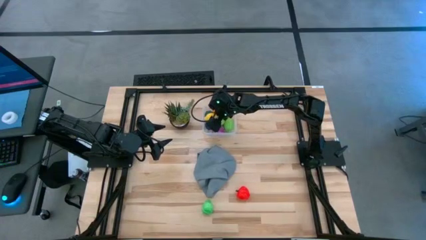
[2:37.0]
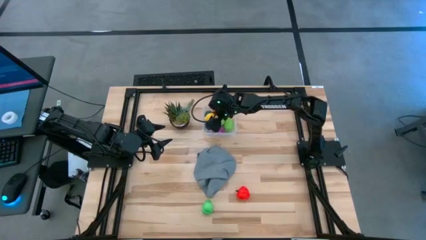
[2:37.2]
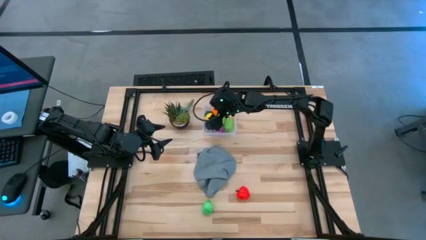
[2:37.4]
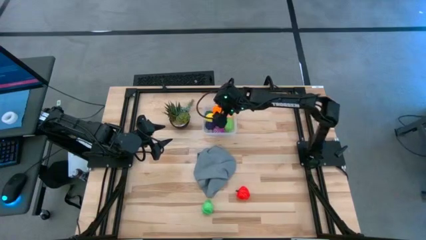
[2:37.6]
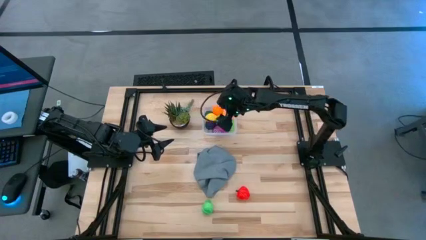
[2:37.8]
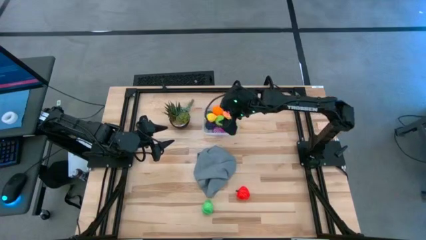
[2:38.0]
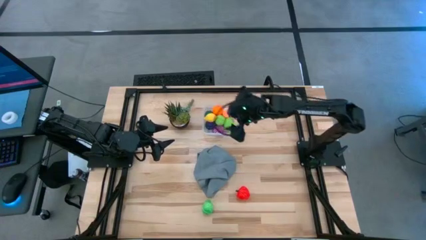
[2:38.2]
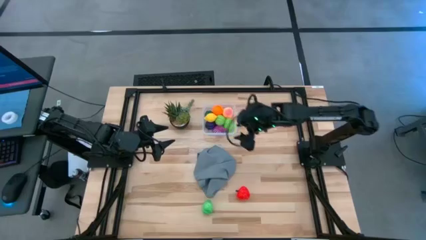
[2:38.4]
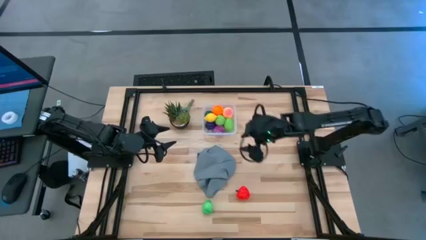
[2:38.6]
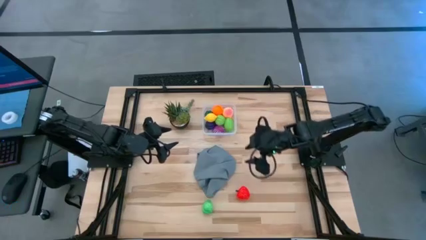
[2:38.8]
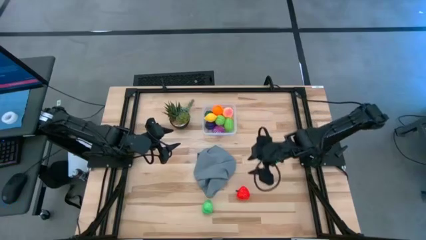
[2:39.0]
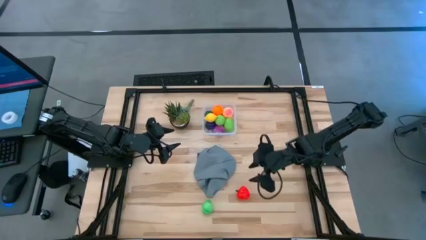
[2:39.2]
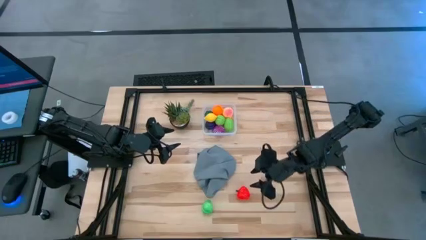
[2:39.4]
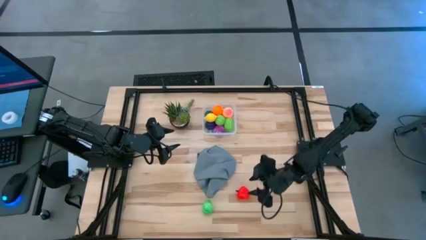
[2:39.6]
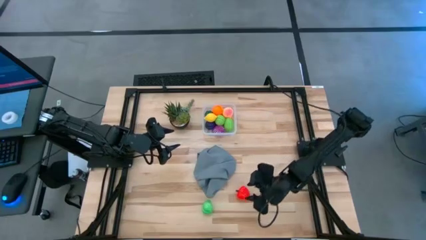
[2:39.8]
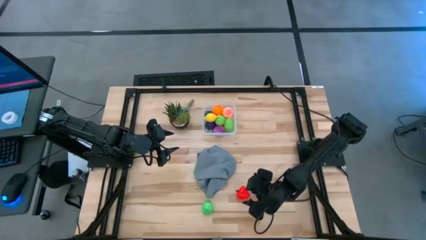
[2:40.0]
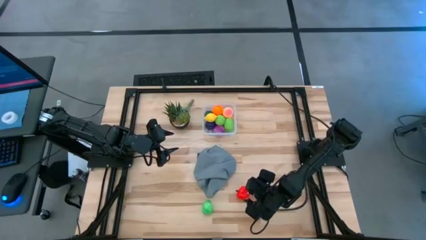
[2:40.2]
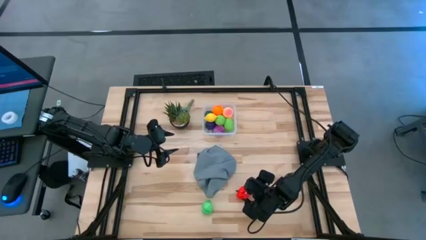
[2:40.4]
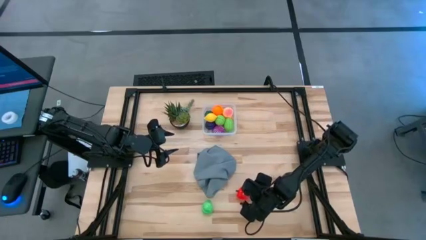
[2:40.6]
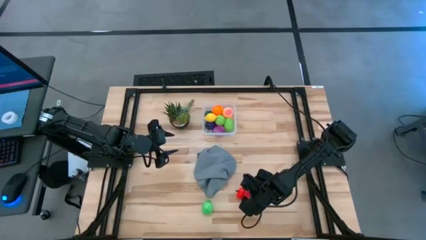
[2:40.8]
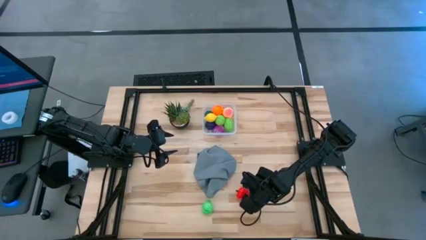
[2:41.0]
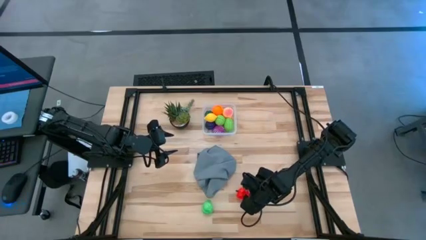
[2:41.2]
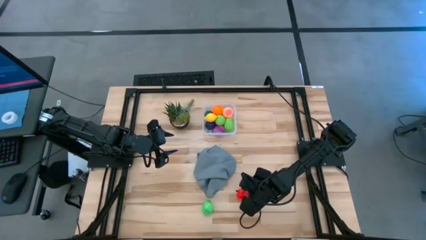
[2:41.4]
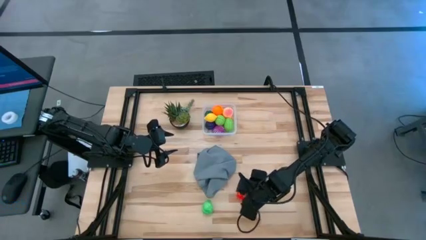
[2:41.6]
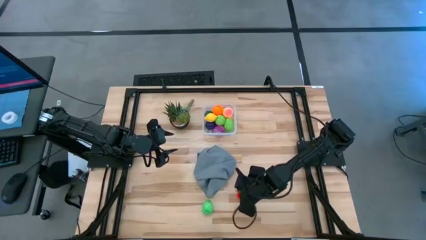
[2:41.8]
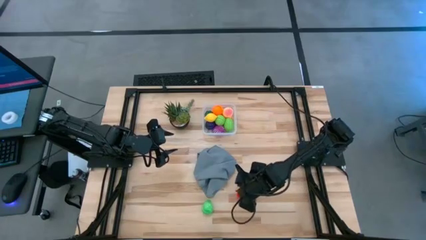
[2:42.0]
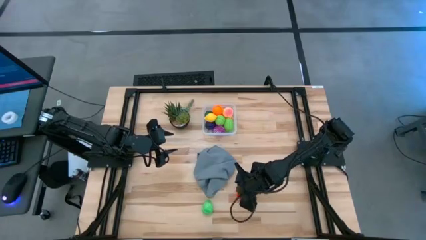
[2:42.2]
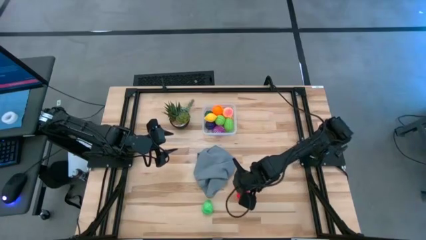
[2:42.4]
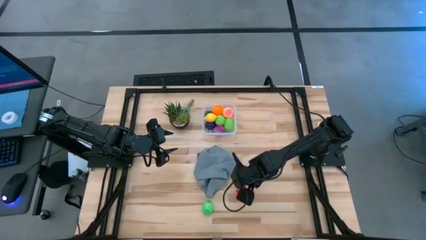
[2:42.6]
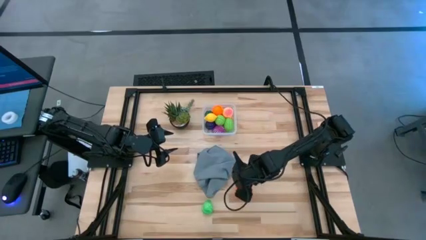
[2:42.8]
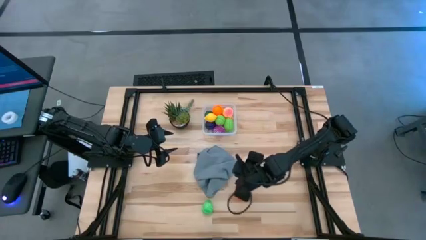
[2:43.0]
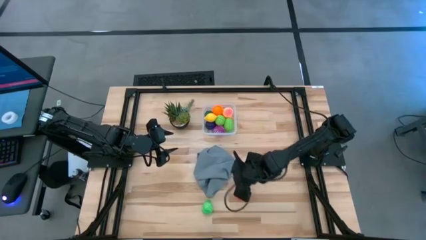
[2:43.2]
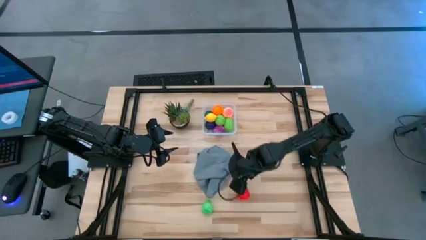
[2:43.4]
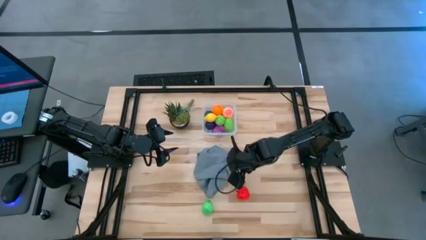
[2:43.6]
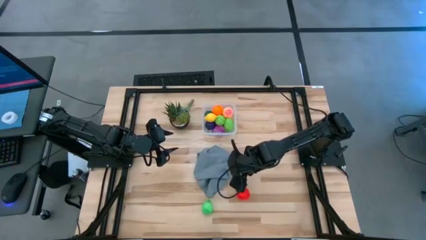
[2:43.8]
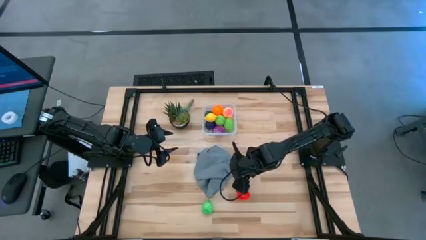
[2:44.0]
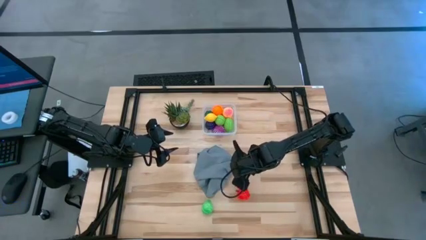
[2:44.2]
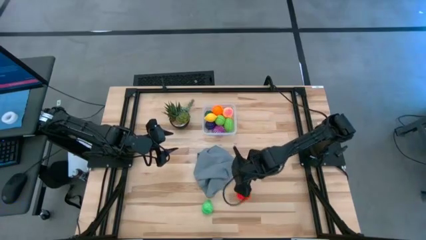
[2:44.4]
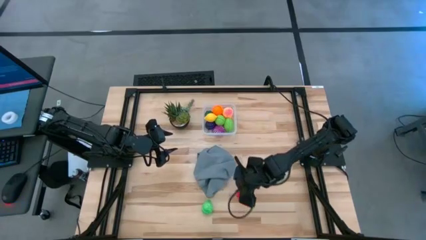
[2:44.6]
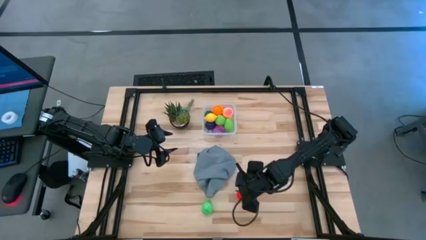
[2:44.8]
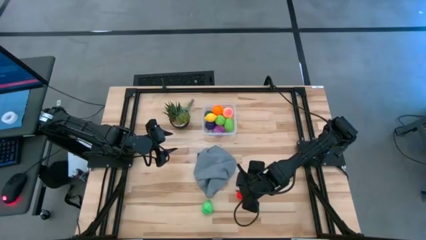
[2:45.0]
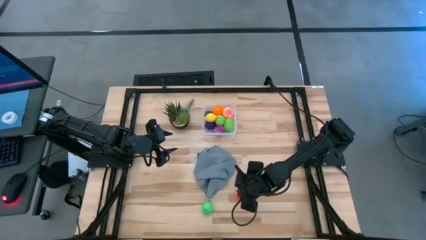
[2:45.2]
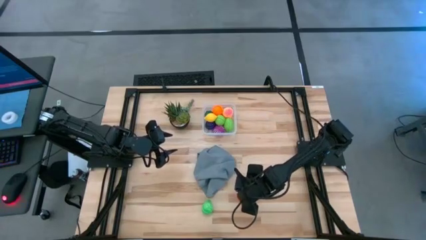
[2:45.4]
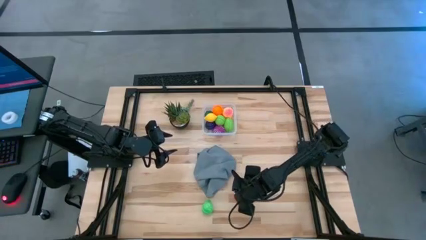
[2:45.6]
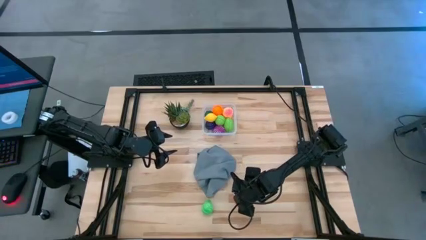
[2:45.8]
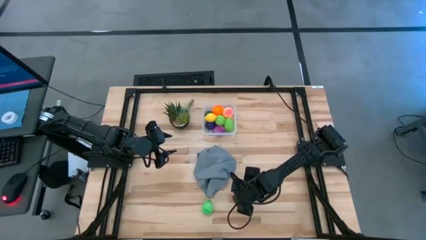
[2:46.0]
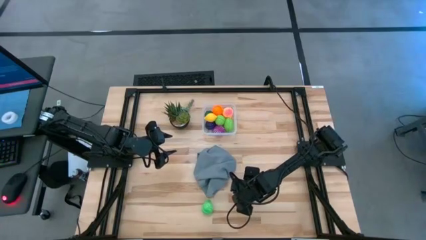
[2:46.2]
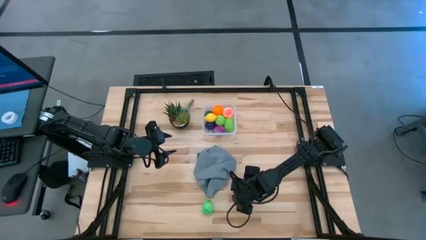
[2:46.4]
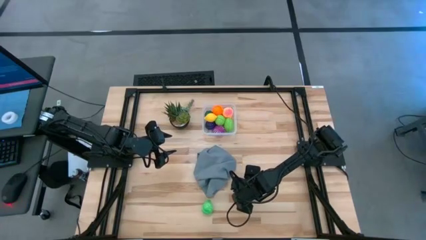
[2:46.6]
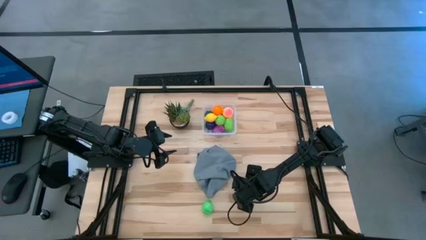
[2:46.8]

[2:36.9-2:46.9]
Task: Pick and placing Produce into tupperware
Put the red apple into the transparent container

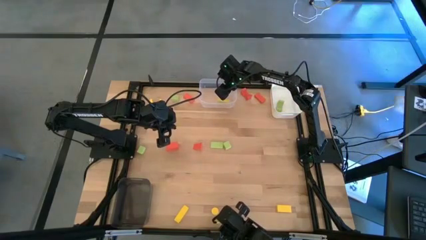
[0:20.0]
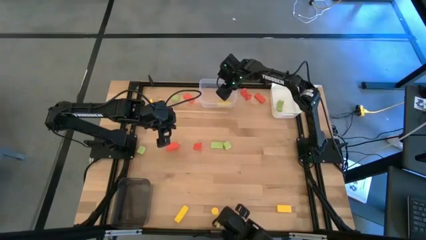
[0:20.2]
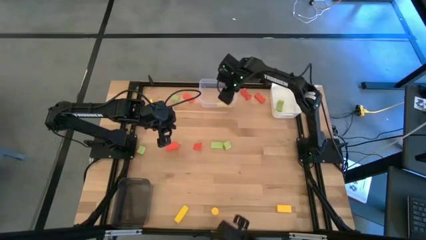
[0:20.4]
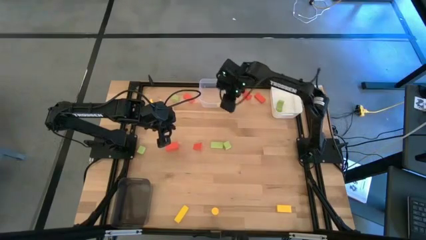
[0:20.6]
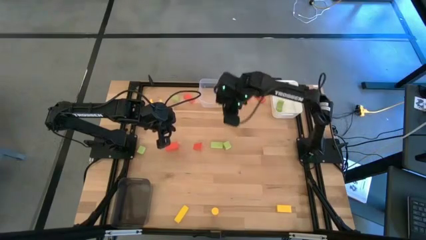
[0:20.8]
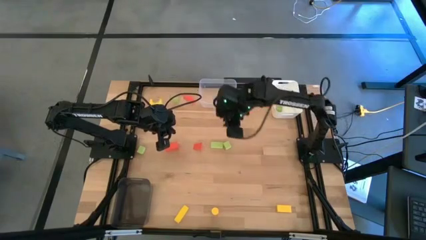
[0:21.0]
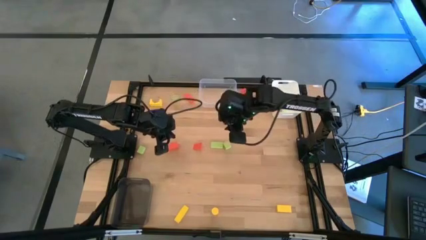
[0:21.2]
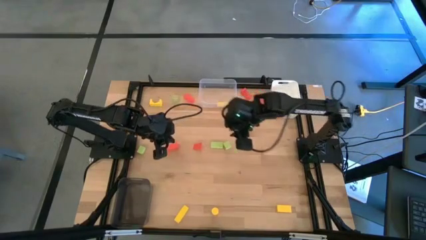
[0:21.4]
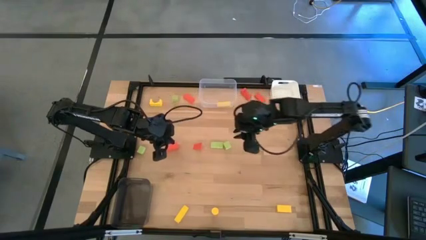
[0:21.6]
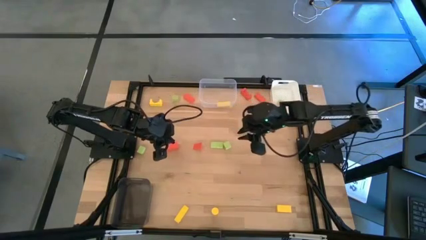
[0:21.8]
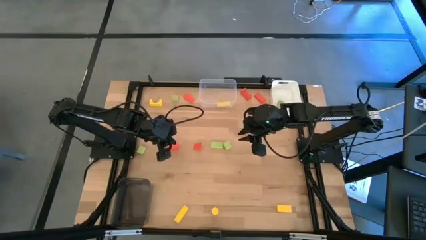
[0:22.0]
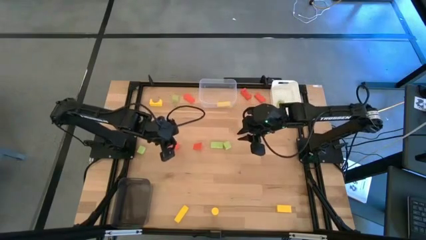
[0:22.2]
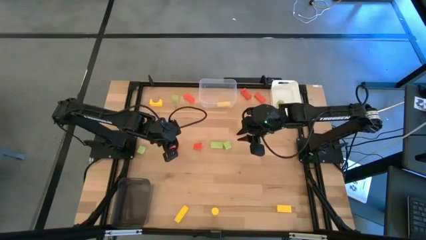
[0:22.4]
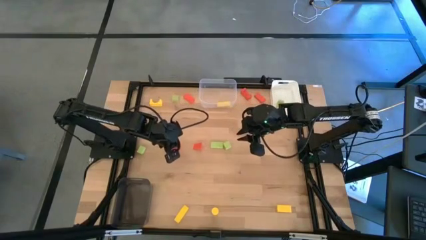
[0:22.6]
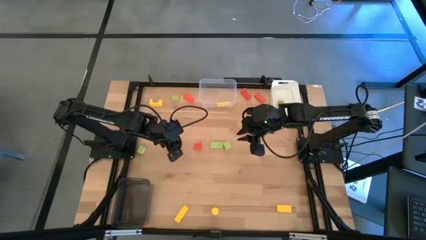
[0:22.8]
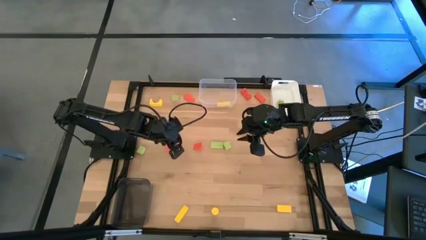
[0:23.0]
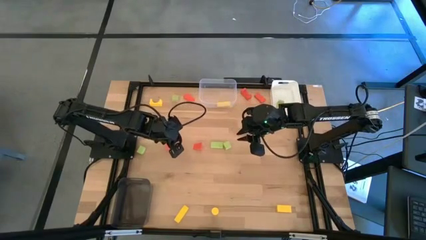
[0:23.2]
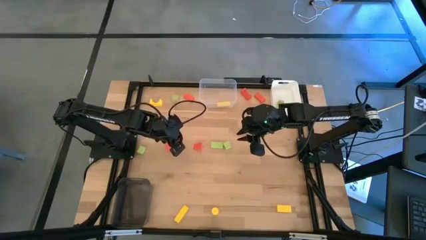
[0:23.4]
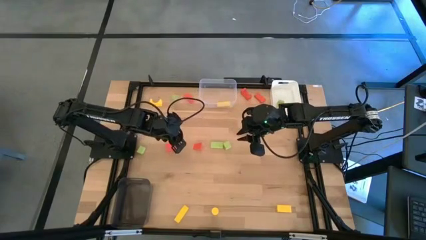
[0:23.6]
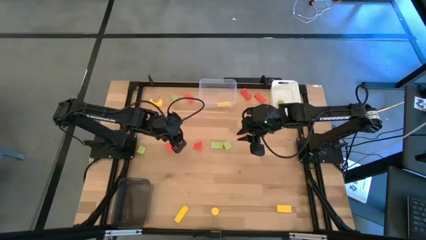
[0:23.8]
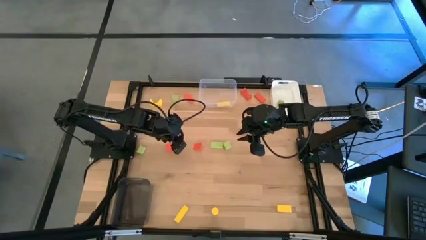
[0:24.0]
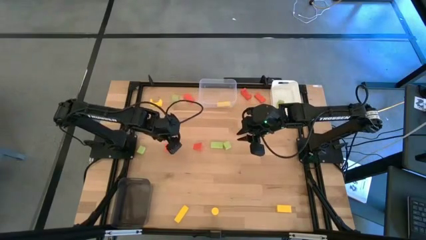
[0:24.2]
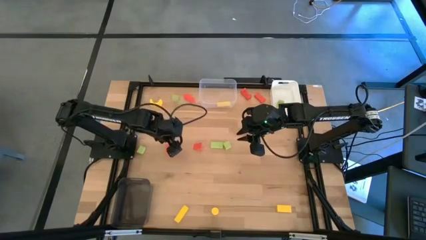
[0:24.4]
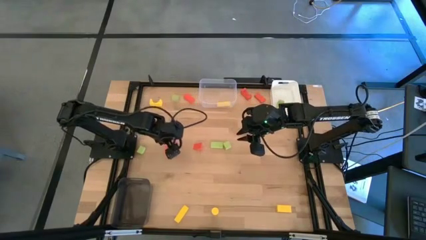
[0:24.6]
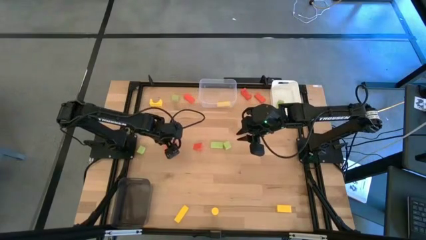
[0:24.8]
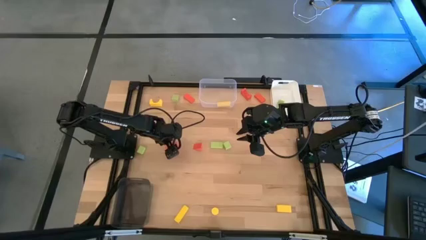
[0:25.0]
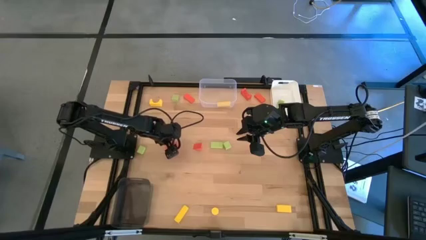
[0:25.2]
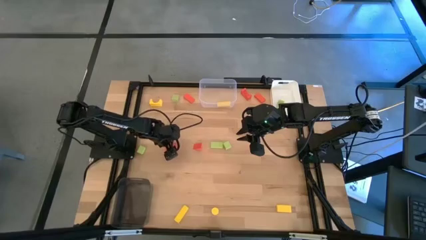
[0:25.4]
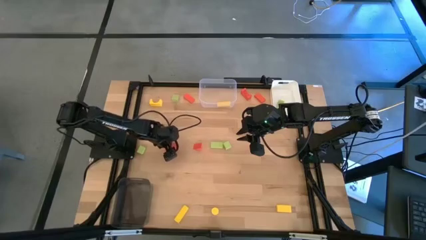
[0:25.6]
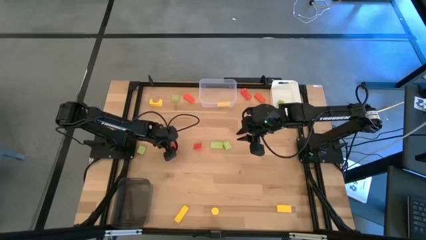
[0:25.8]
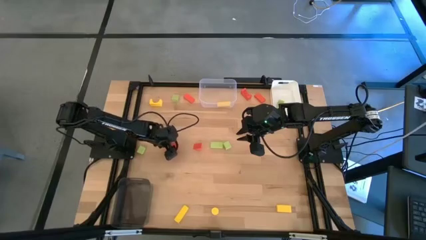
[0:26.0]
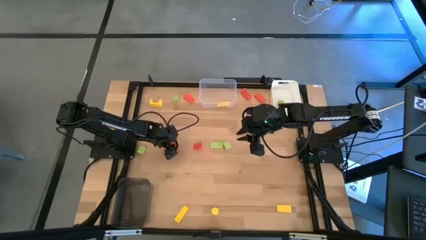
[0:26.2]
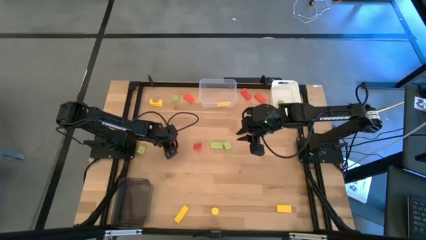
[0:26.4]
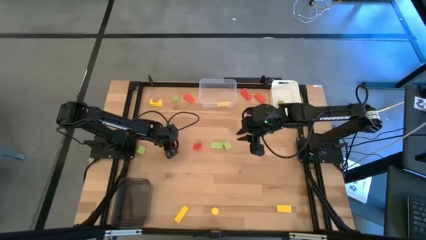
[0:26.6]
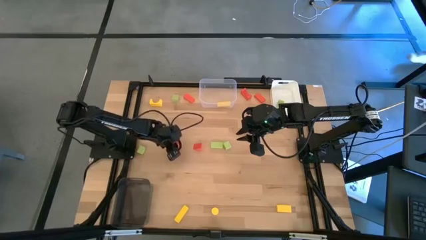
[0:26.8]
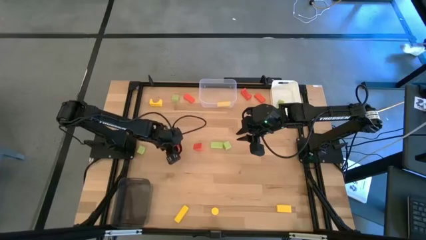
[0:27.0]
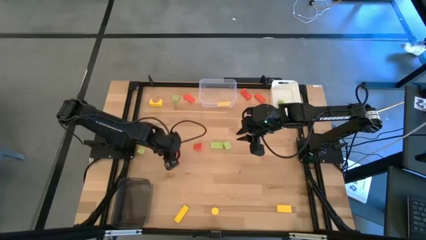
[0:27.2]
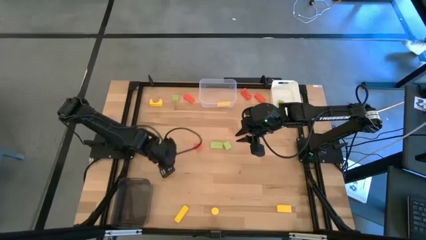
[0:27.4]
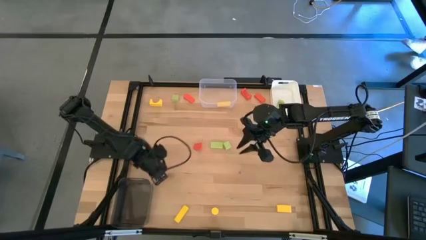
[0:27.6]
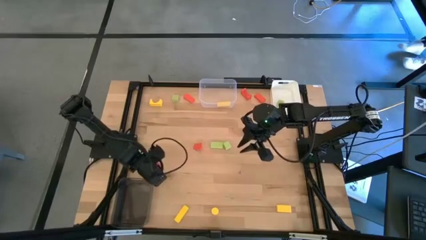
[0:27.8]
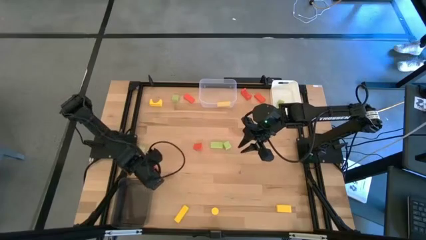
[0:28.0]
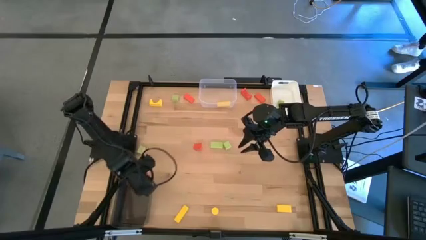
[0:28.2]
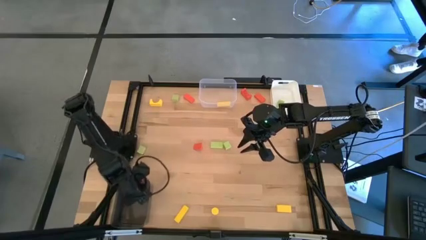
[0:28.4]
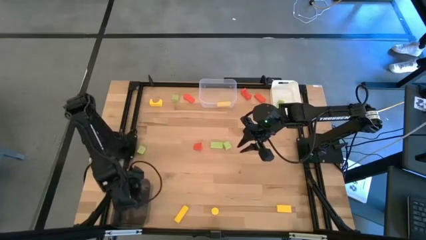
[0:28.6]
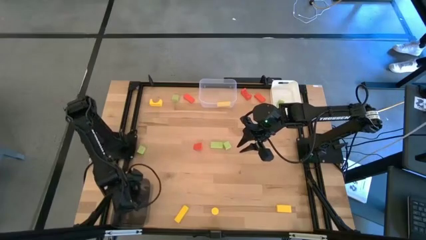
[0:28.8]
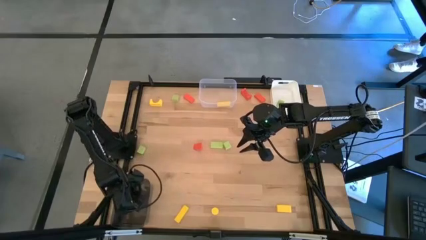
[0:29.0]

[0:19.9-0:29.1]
Task: Sort & place blocks by color
Put the orange rectangular block into the black bin
